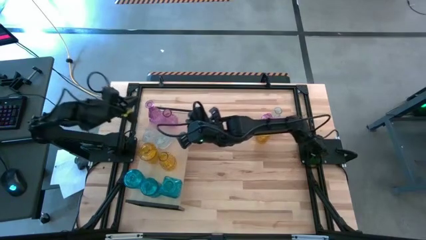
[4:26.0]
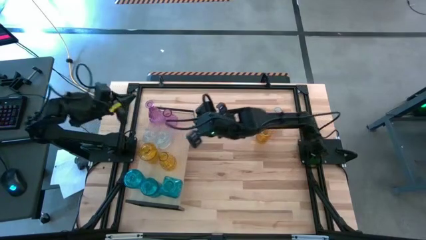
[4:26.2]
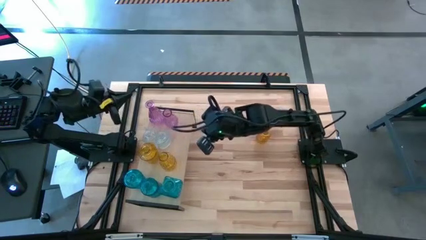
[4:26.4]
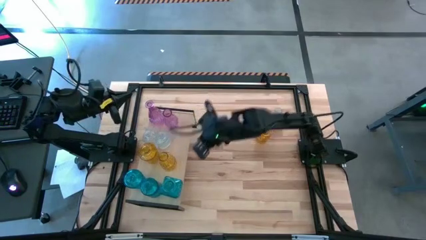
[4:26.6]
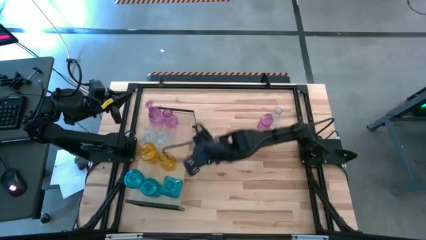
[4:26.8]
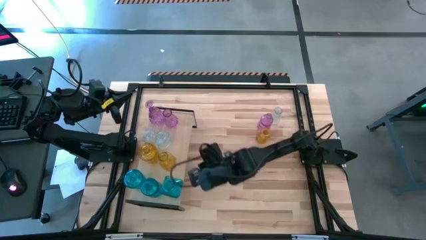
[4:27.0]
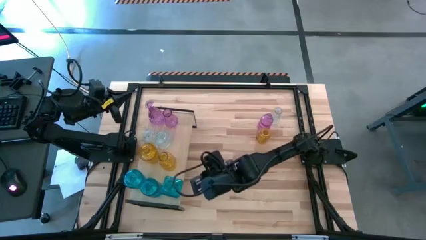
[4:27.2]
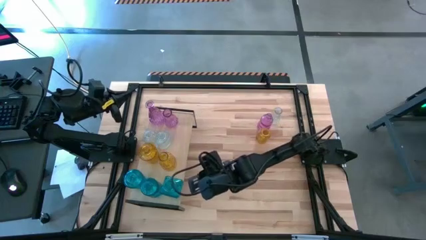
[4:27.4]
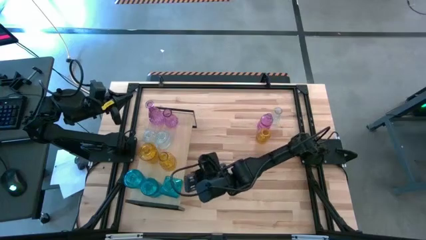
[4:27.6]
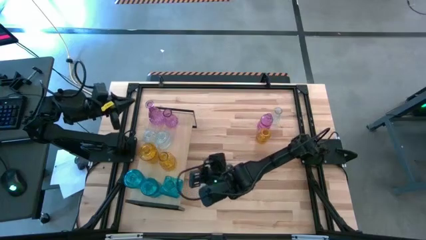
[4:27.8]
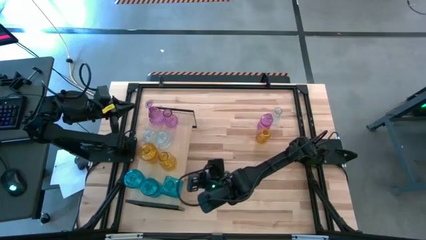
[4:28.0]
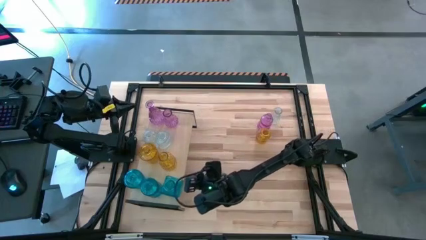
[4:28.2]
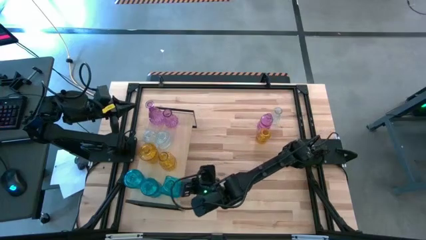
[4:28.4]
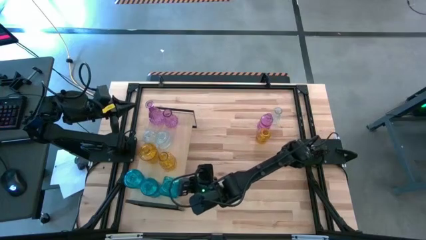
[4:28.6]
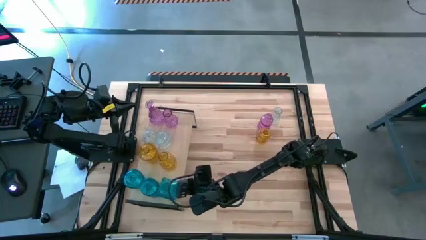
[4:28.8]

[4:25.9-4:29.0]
Task: sort vases onto shelf
Adjust the blue flower vase on the shelf

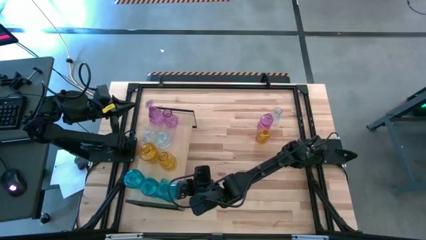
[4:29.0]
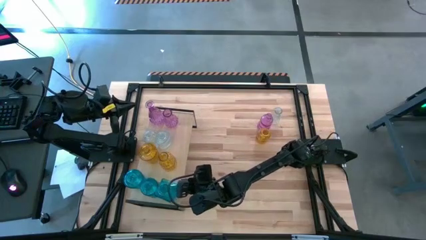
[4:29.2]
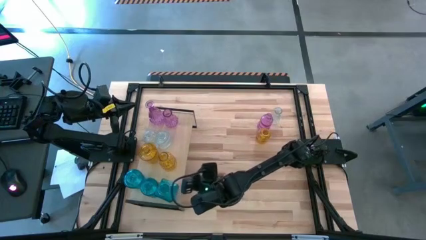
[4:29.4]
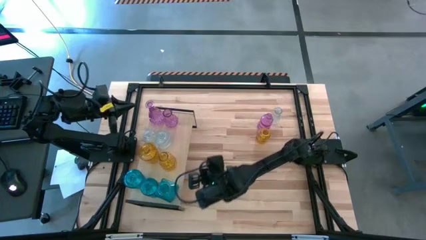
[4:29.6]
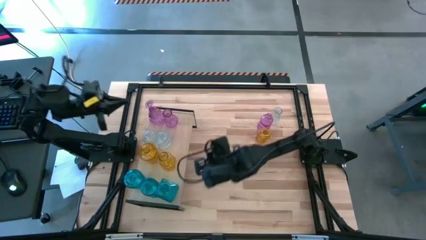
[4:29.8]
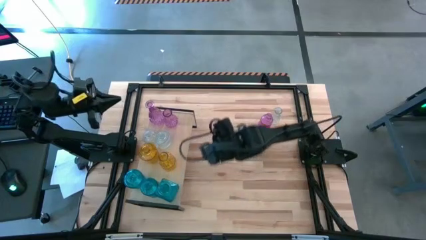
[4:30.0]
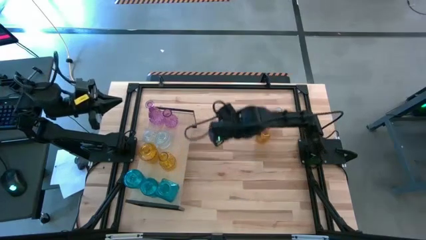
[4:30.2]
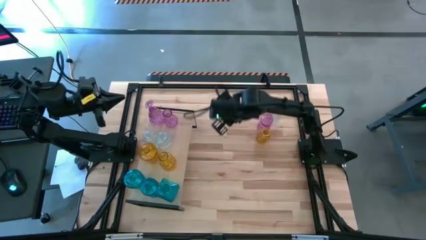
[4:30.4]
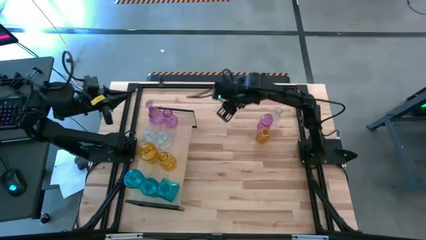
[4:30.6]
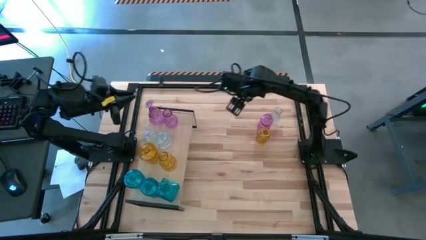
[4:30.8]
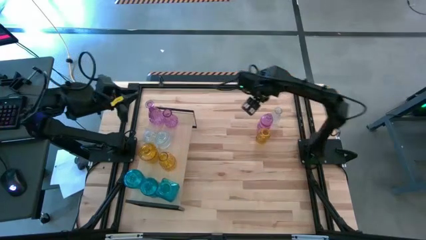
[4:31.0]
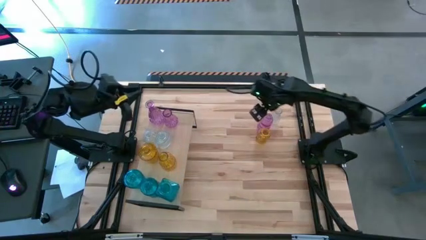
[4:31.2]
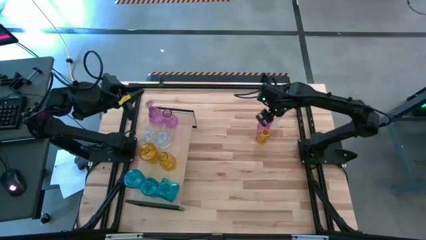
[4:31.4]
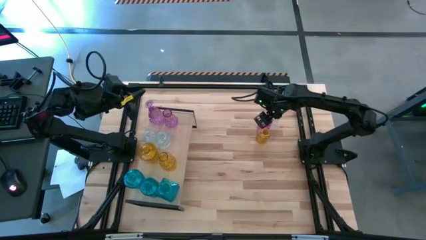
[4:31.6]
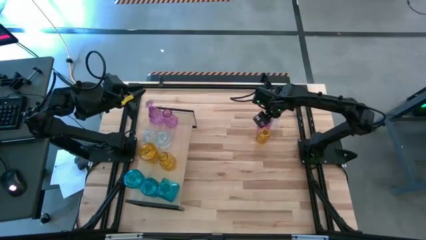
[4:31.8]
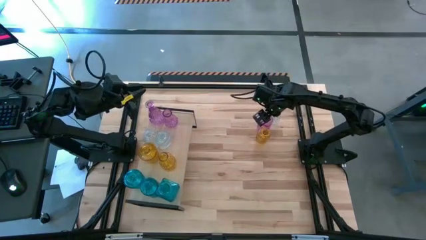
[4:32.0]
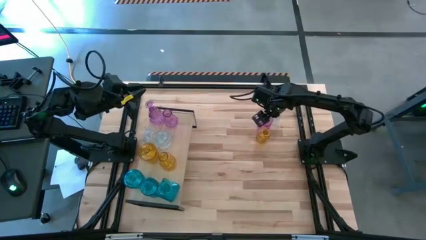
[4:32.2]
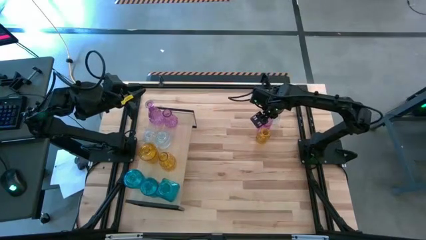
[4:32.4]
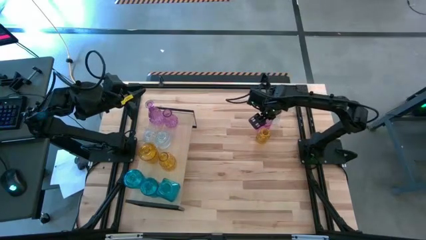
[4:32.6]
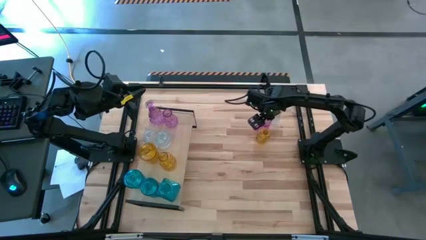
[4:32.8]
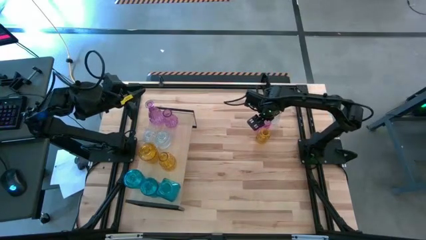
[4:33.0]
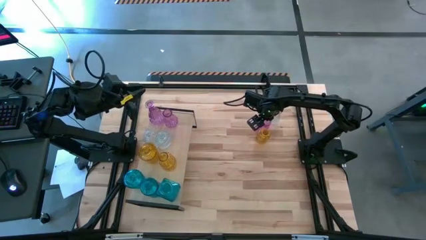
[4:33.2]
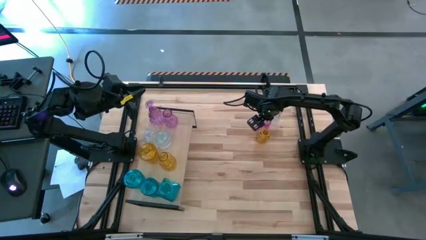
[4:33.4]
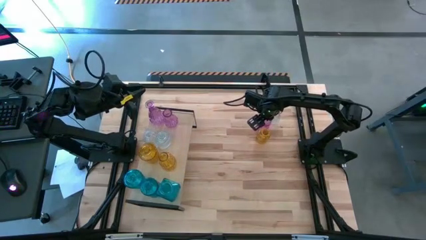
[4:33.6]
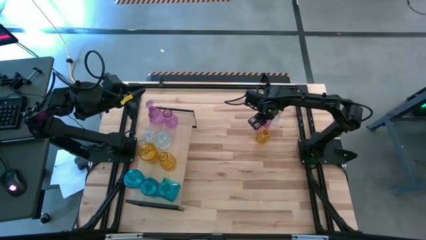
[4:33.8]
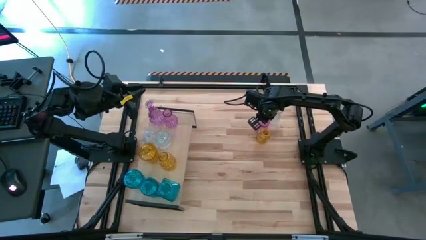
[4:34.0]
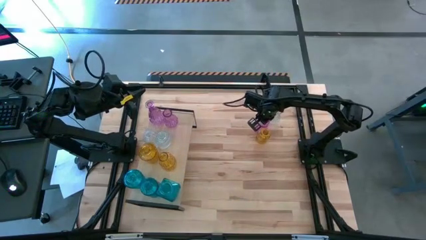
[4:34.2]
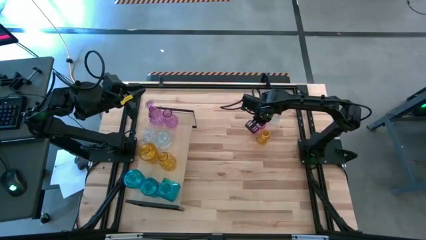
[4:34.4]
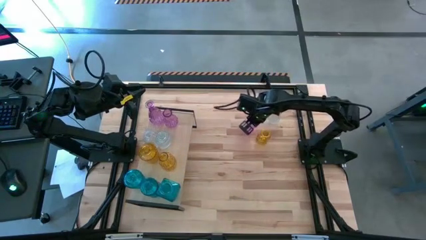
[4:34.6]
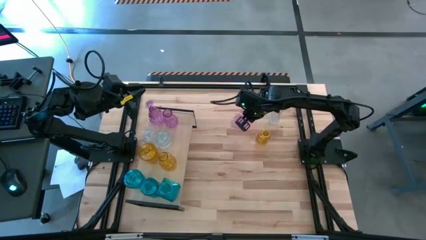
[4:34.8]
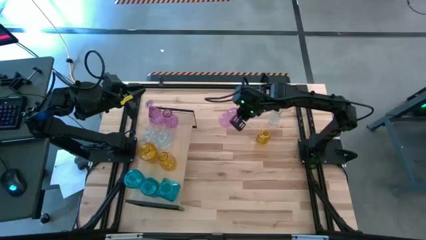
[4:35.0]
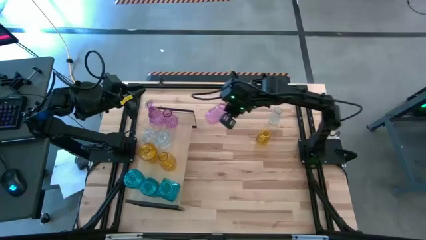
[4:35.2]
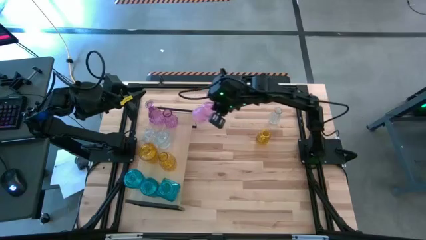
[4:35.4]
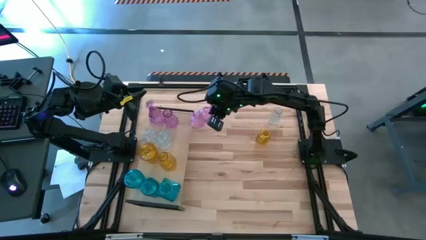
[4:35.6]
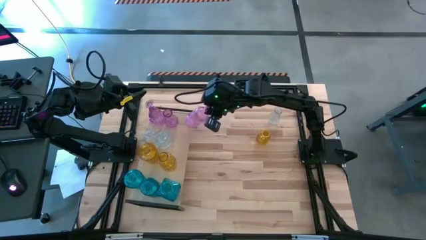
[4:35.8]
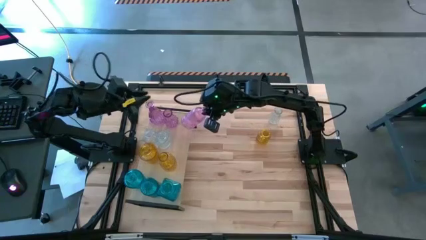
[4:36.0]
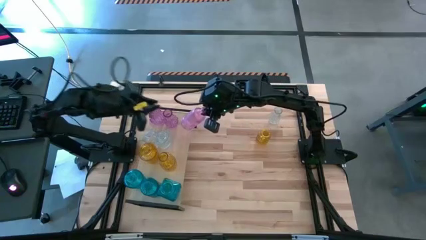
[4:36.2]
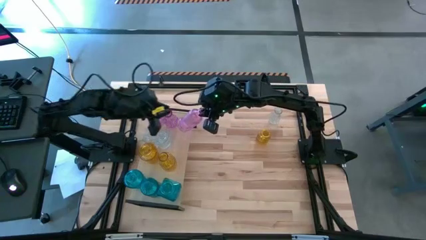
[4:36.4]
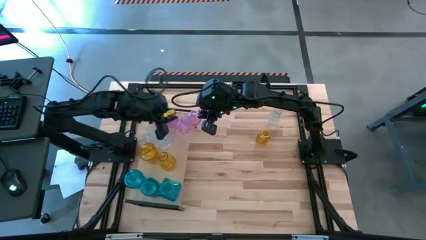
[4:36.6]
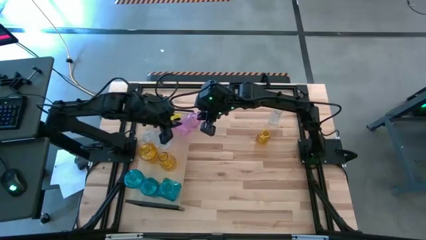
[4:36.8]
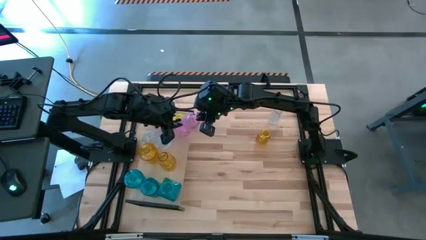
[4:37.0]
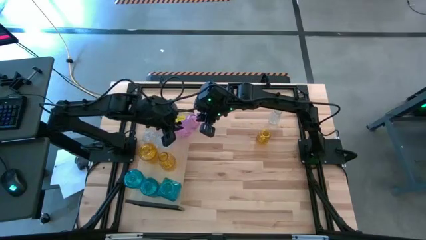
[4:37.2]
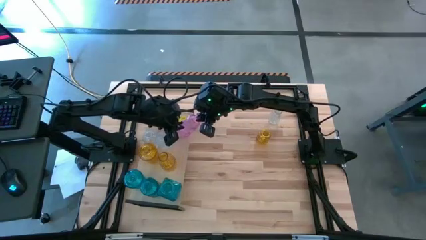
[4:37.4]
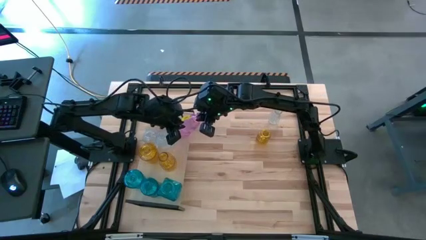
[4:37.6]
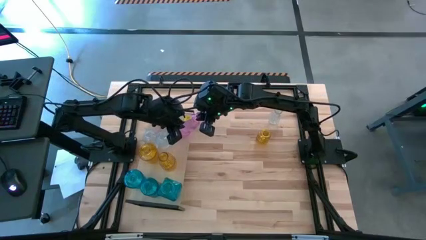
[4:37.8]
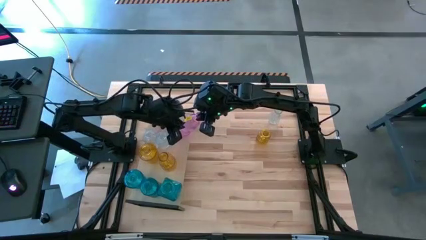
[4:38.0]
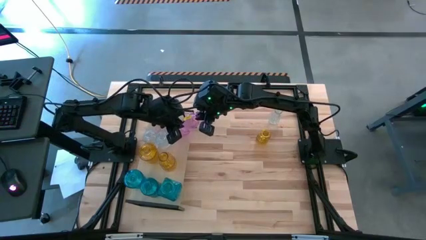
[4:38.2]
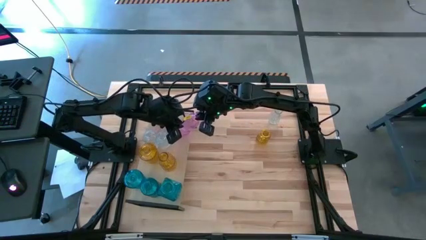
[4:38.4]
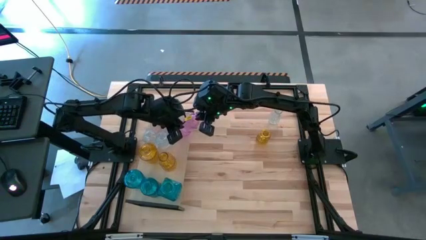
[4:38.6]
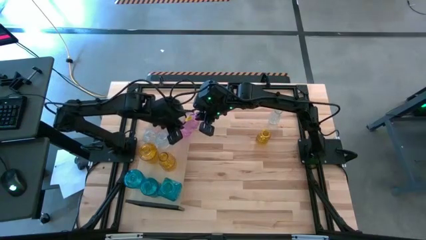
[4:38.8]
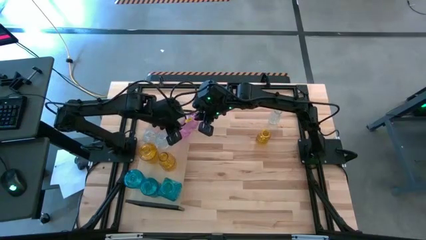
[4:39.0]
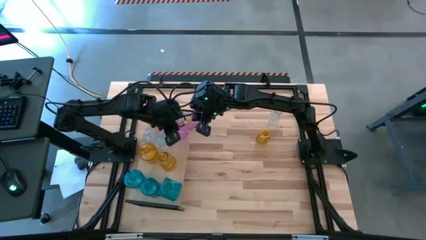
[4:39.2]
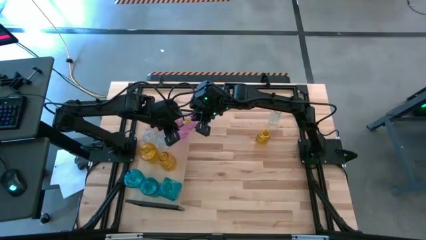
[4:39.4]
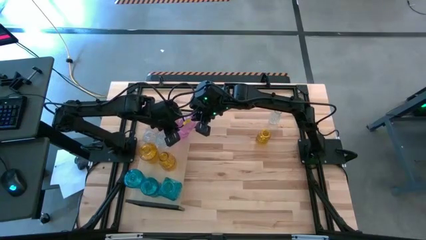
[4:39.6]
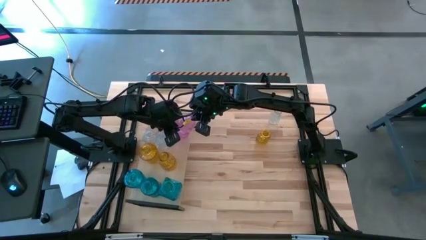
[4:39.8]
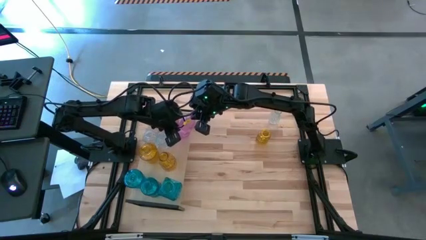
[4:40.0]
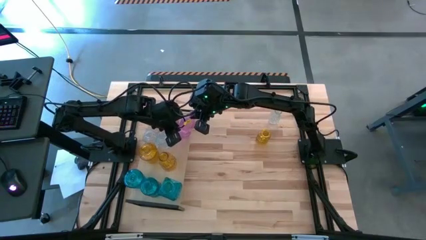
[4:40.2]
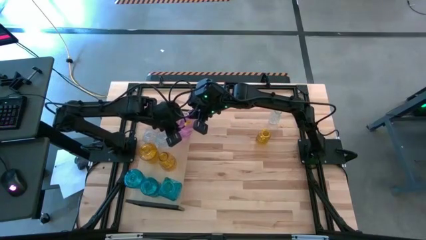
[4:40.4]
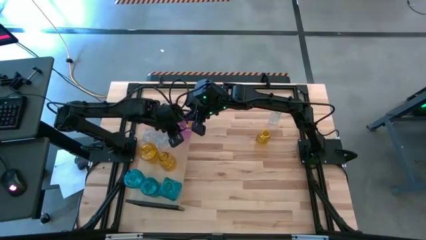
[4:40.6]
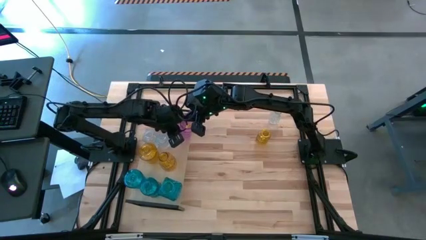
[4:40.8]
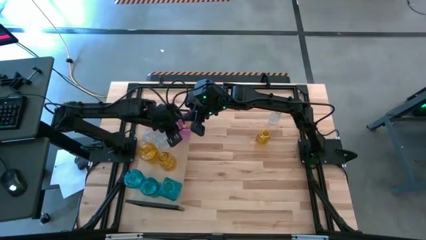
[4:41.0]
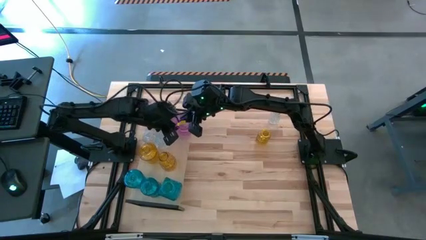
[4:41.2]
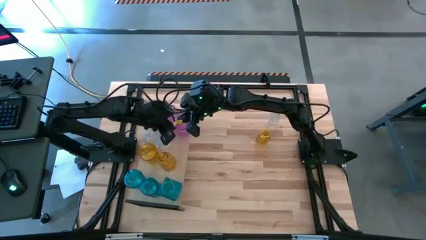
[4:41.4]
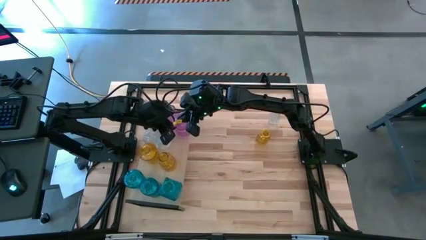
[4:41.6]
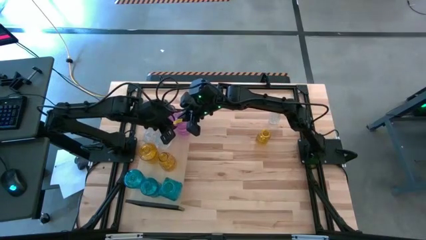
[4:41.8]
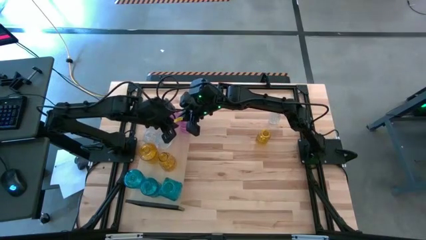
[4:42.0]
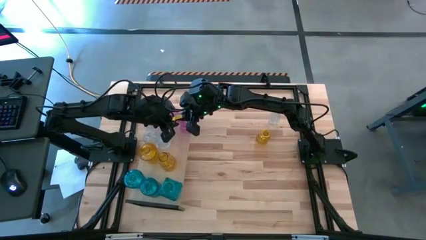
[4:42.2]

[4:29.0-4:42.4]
Put the violet flower vase on the shelf
